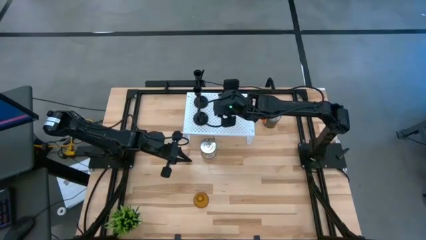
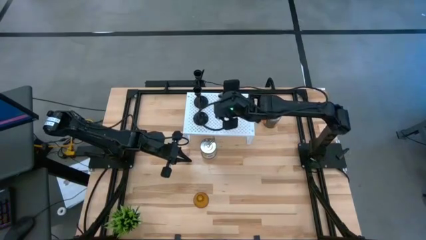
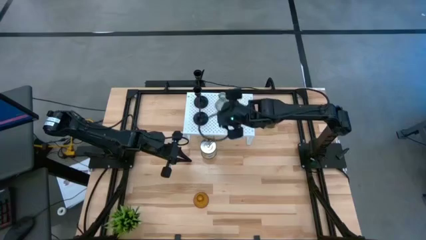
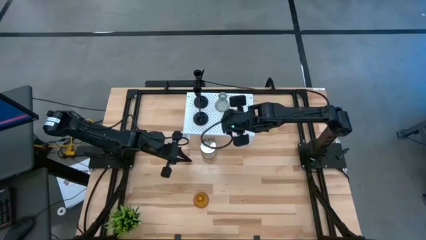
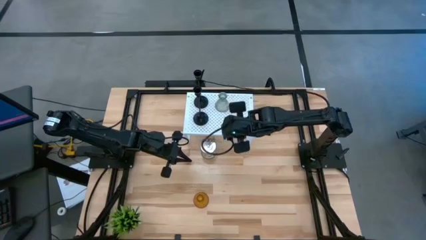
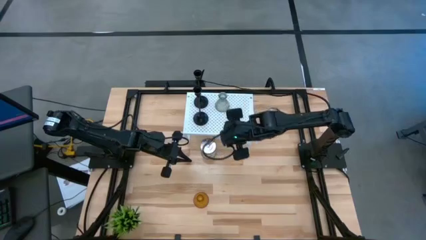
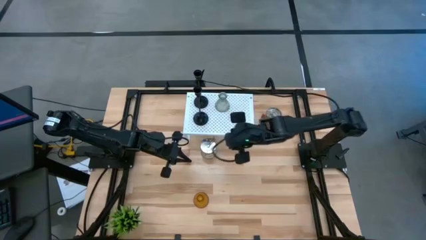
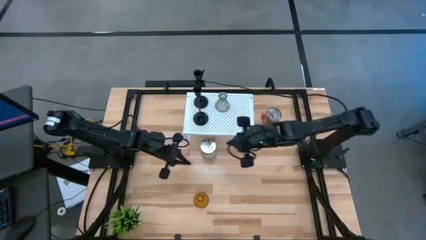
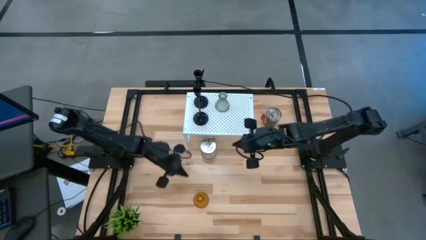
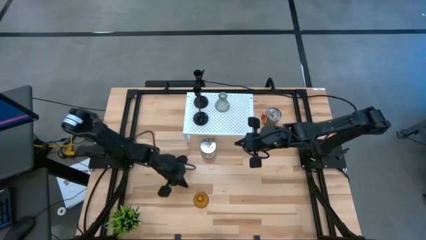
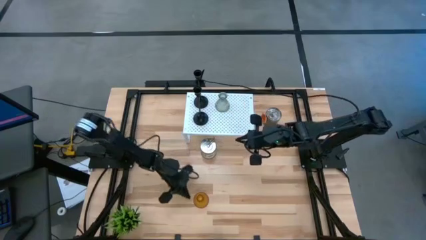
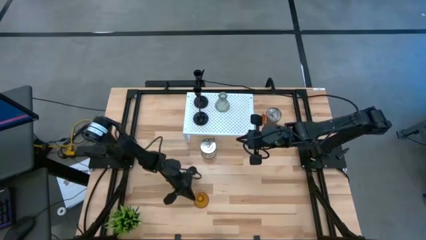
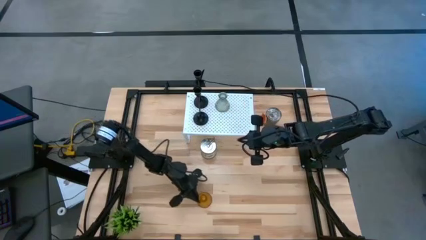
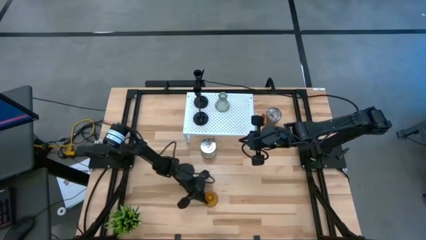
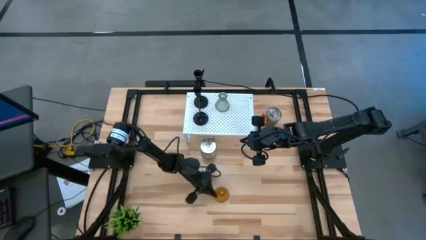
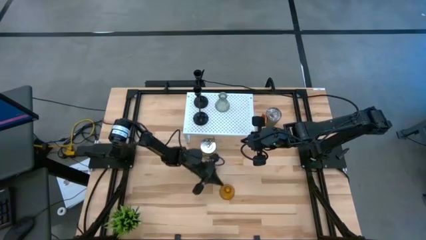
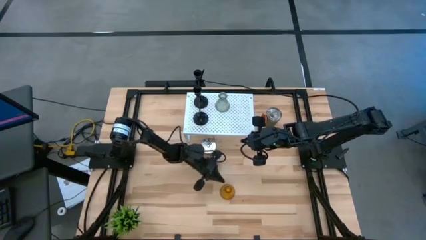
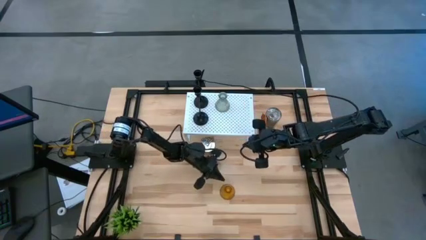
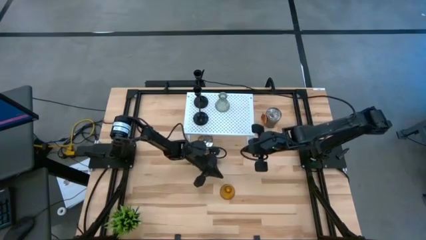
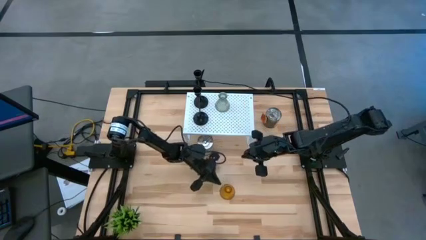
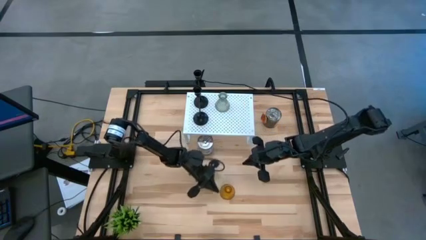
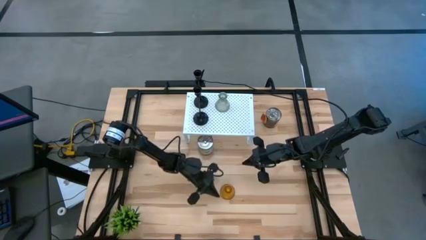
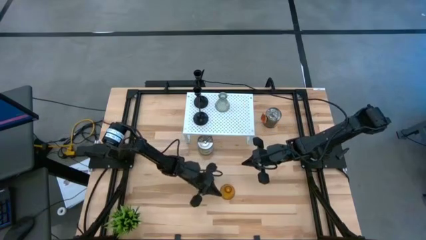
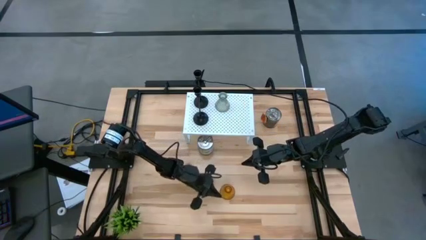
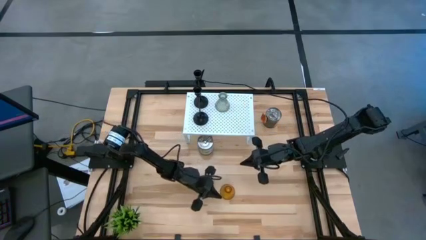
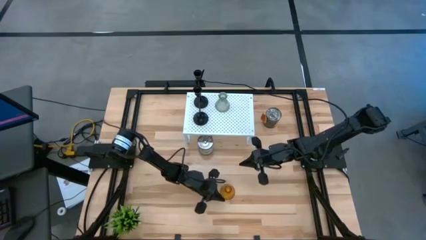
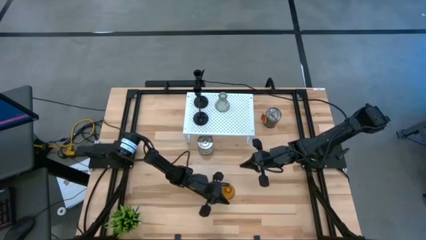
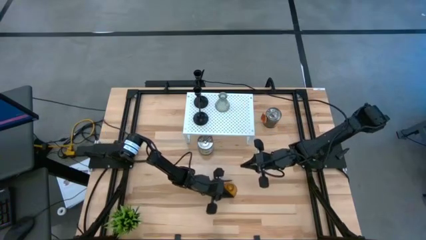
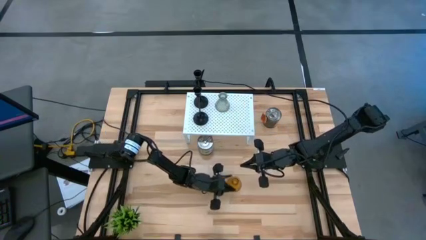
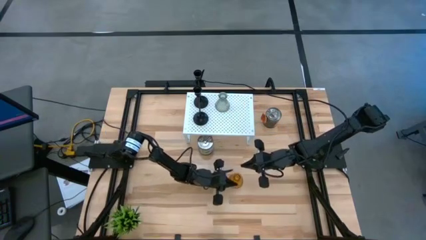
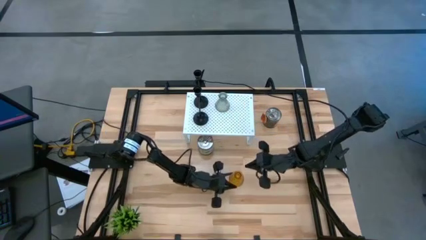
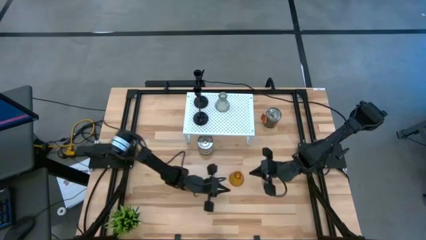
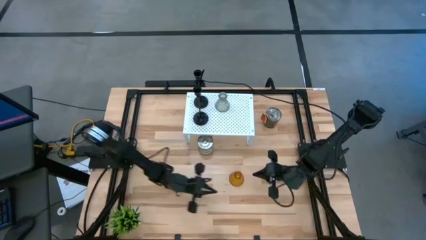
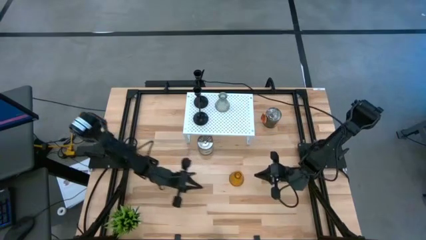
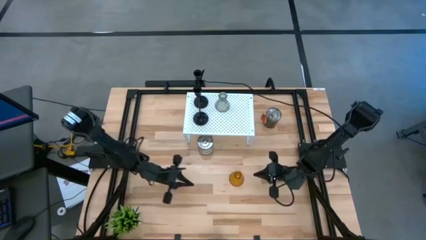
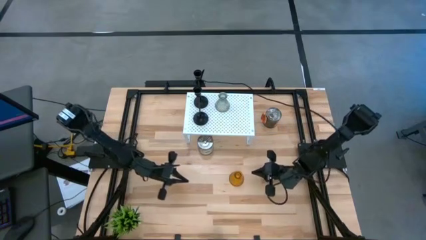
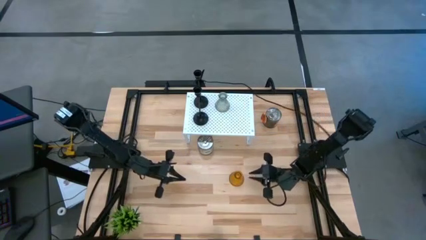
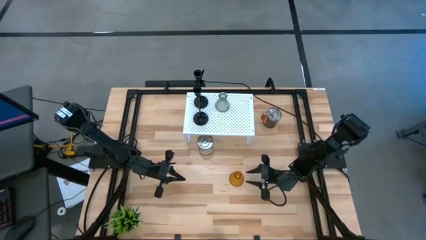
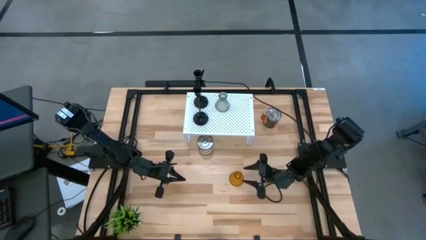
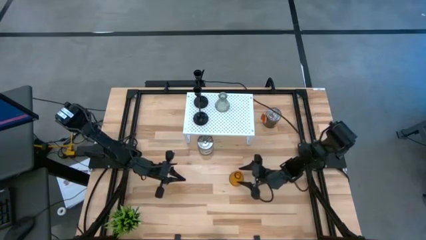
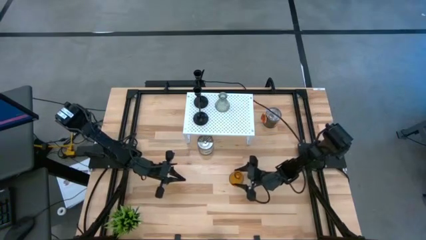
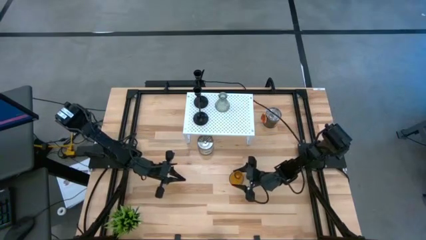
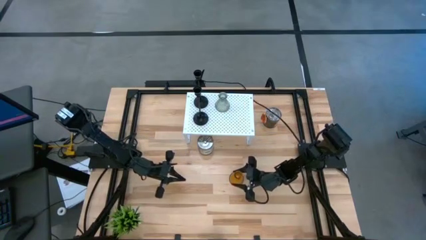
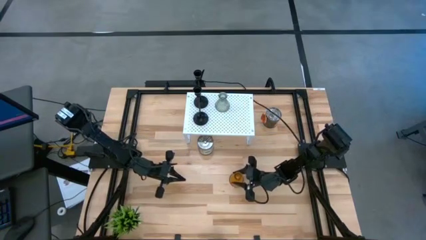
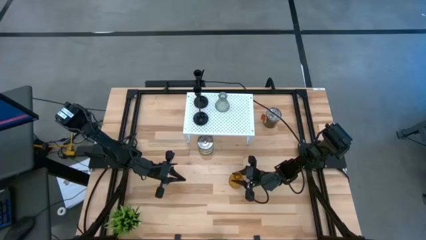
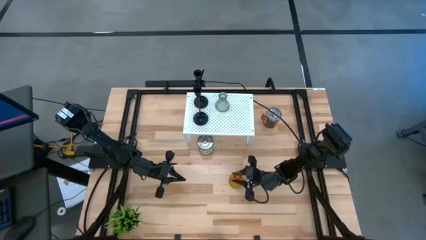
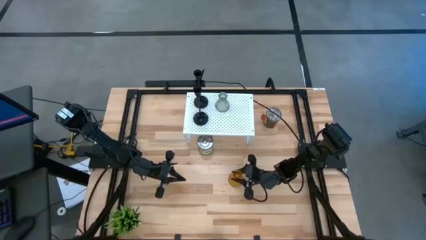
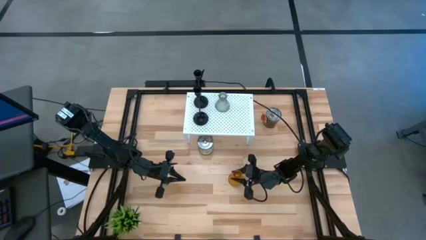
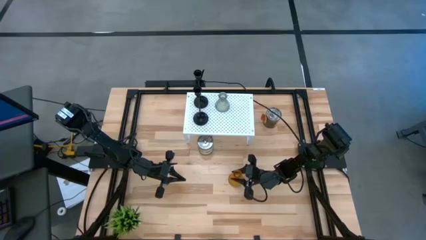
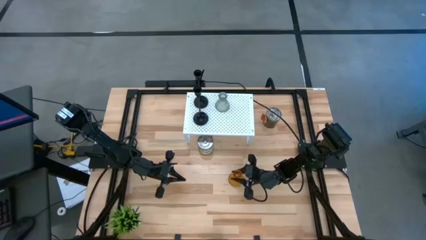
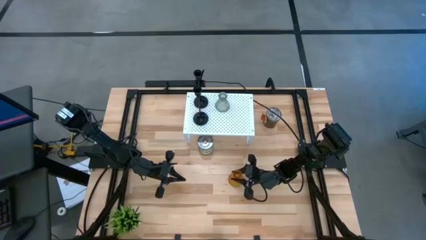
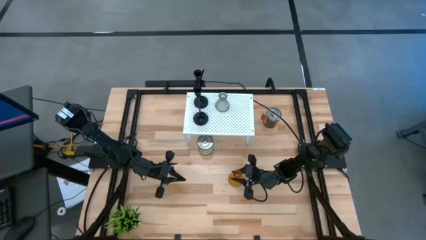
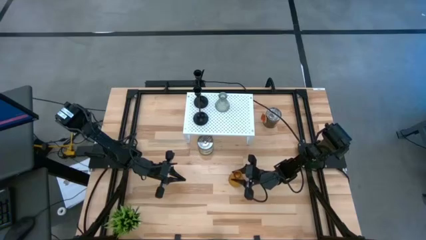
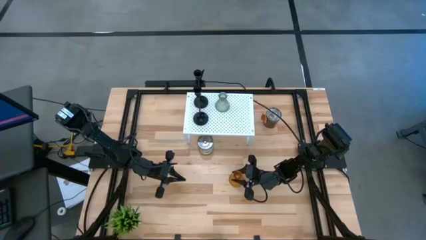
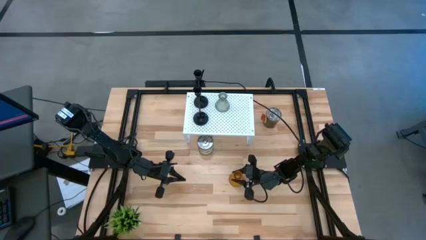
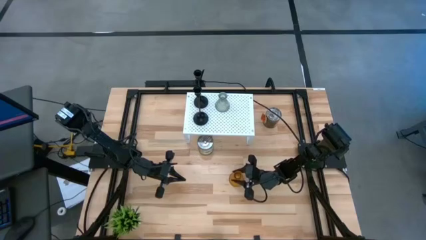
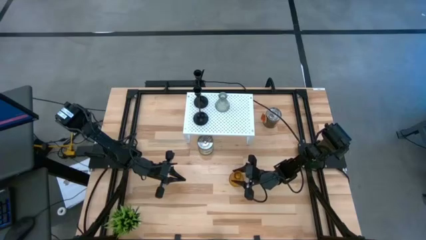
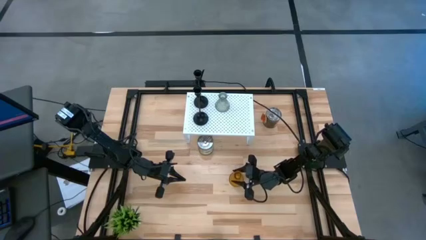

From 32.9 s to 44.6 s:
Task: Pick & Place candle stick holders
Put the orange glass on the shelf

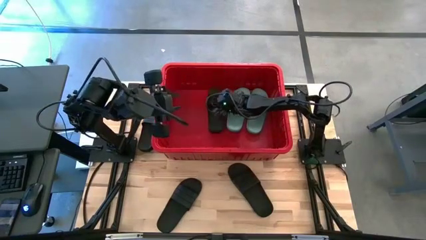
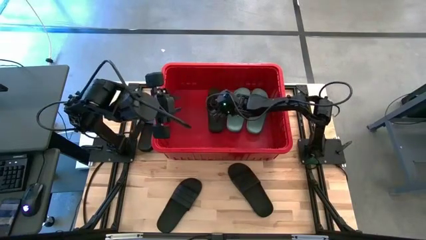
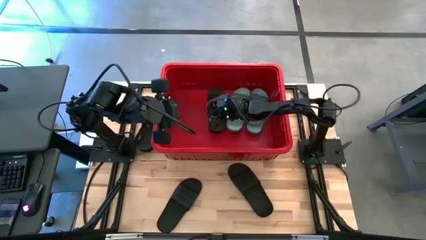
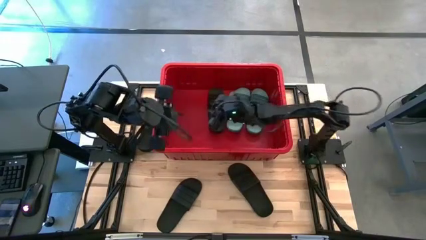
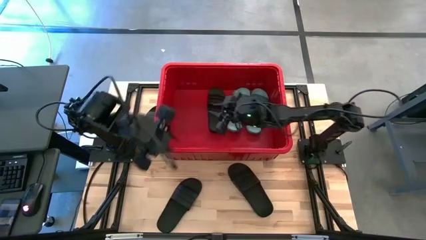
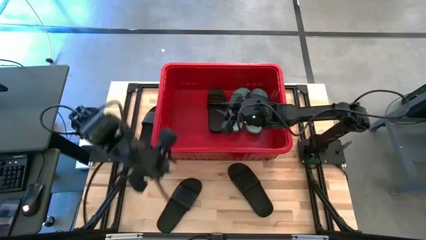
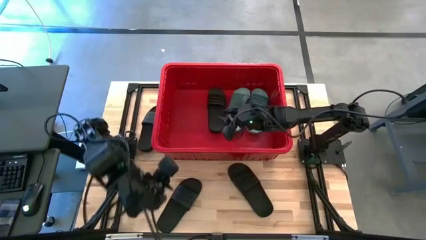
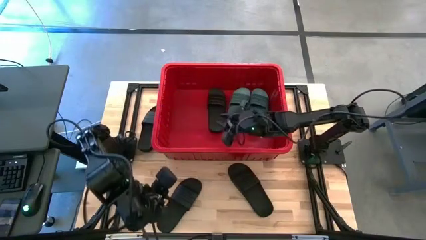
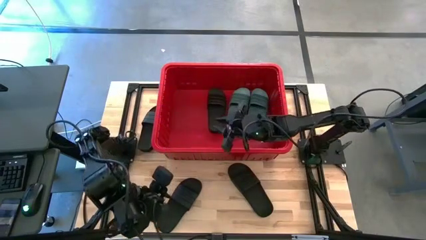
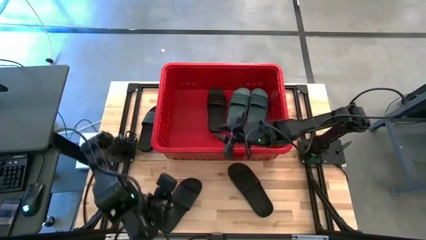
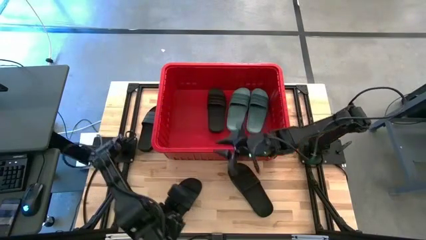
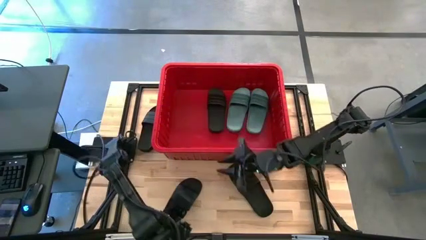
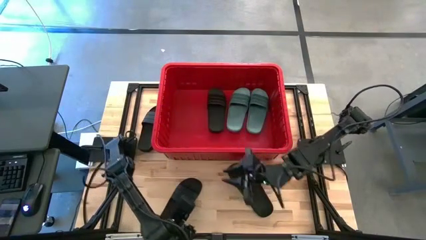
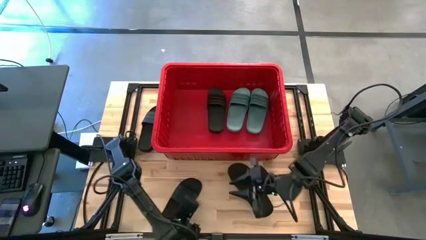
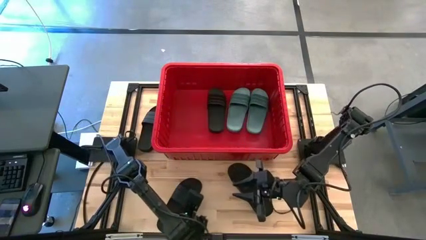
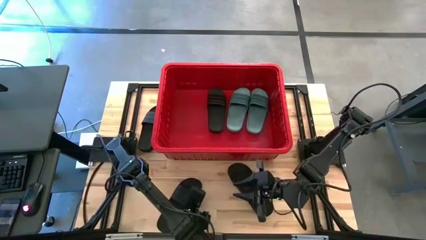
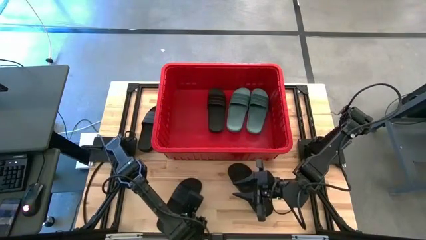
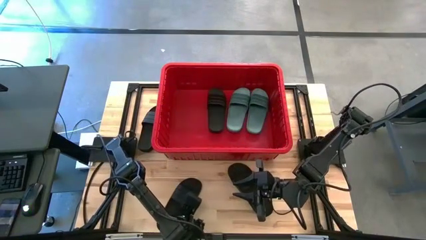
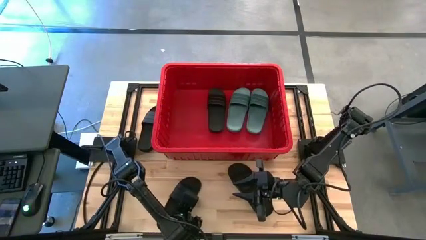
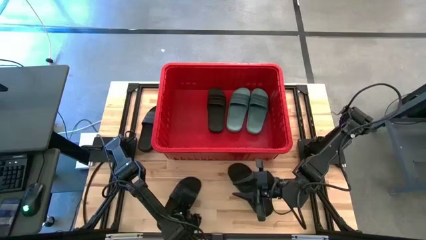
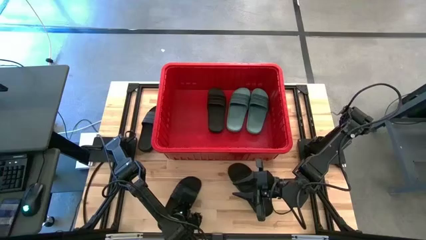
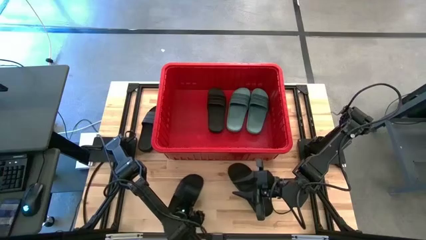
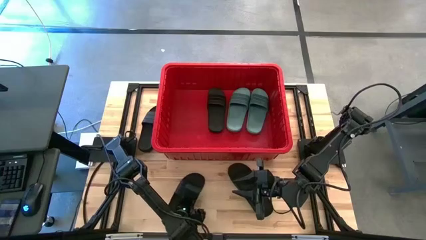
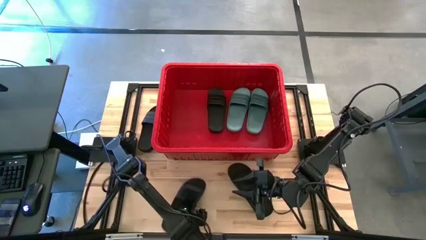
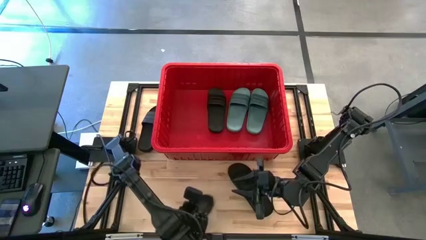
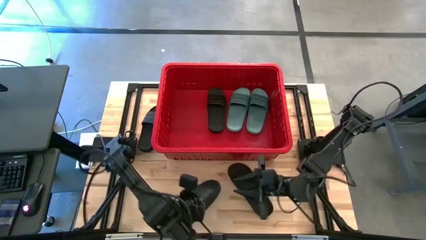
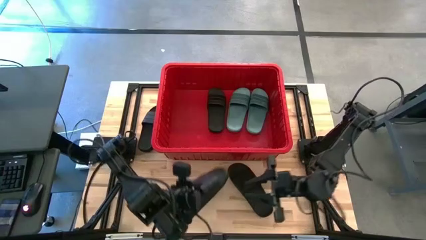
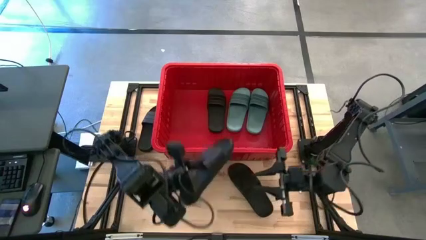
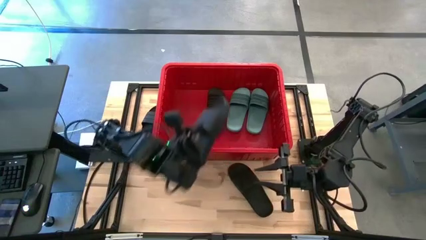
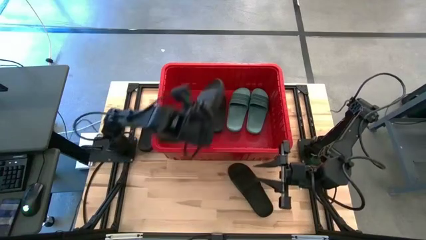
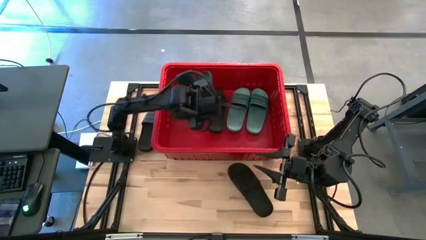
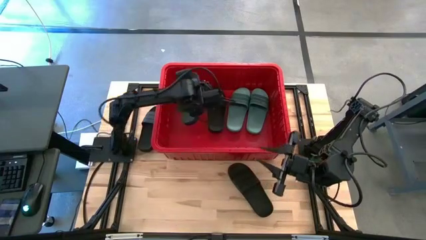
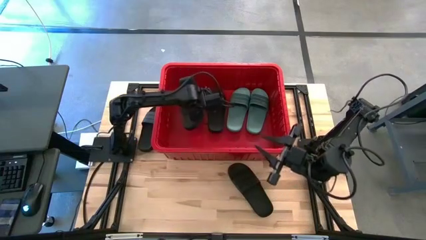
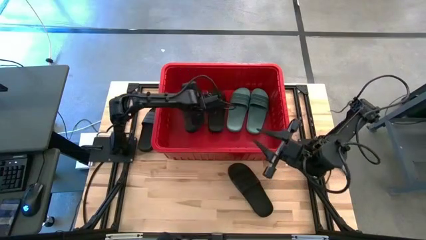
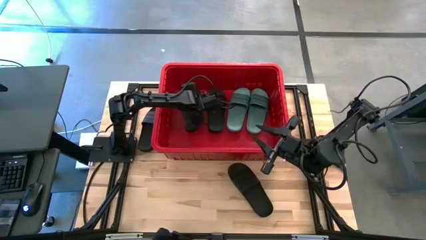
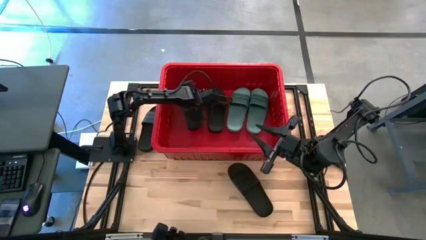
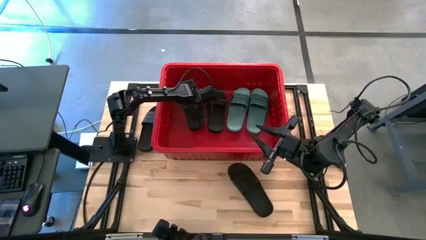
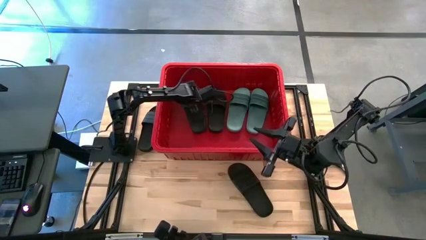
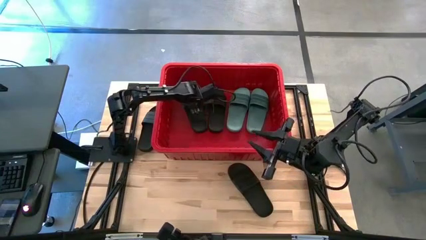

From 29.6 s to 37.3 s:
Task: Pick and place slides into bin
Put the black slide into the red container
